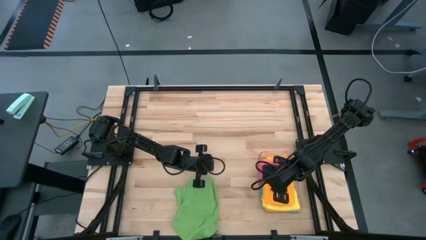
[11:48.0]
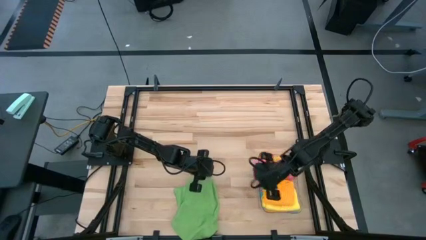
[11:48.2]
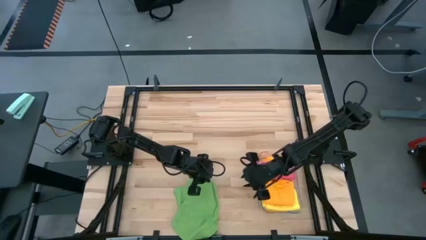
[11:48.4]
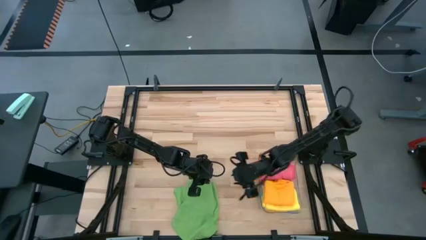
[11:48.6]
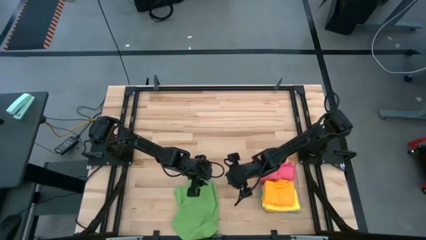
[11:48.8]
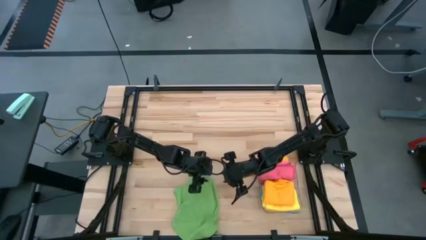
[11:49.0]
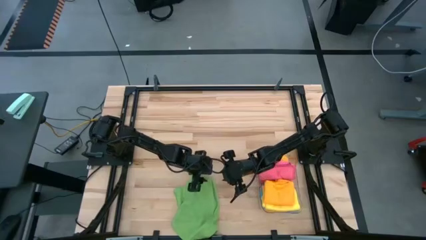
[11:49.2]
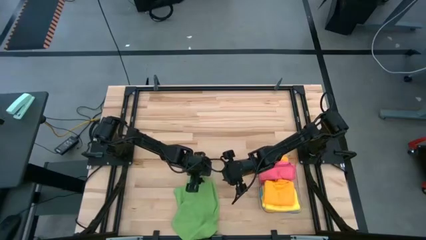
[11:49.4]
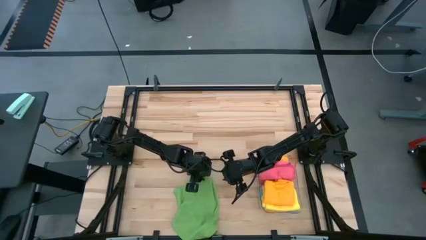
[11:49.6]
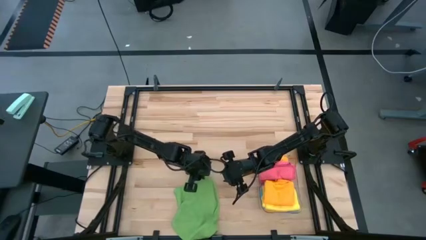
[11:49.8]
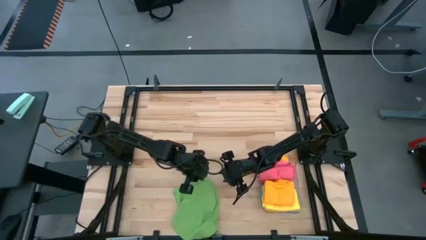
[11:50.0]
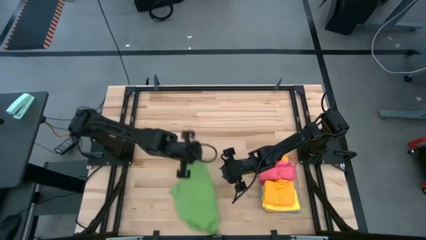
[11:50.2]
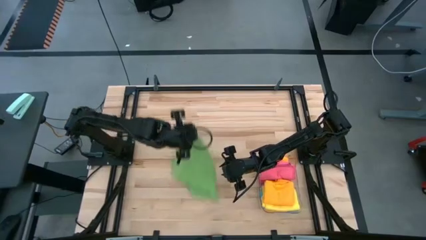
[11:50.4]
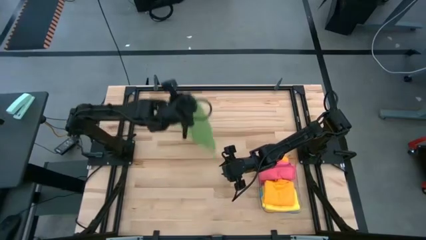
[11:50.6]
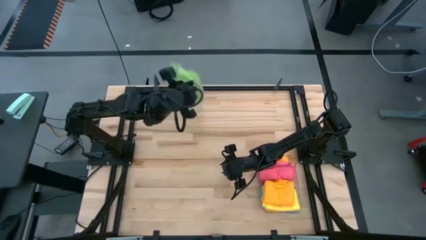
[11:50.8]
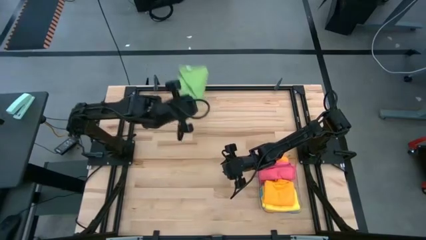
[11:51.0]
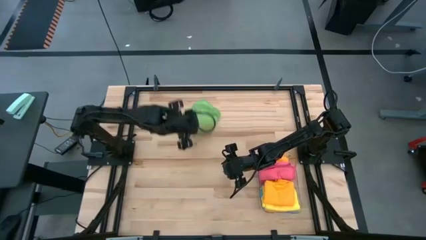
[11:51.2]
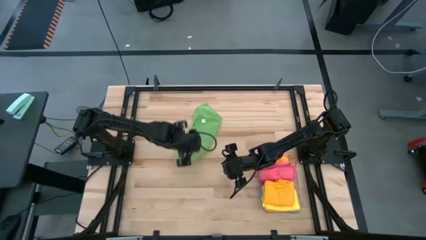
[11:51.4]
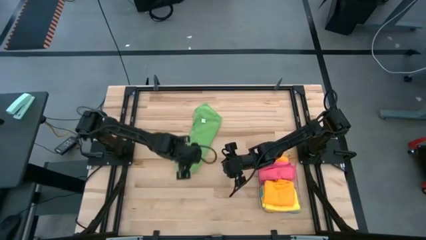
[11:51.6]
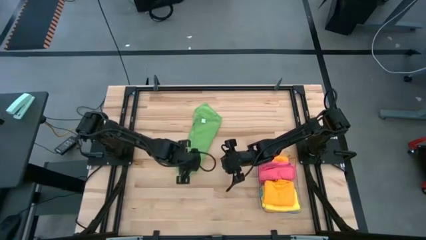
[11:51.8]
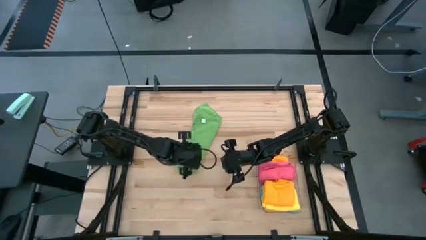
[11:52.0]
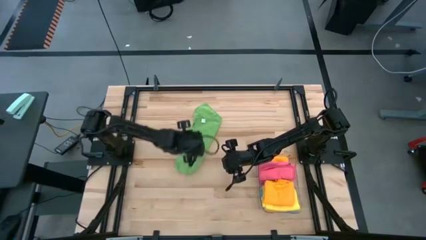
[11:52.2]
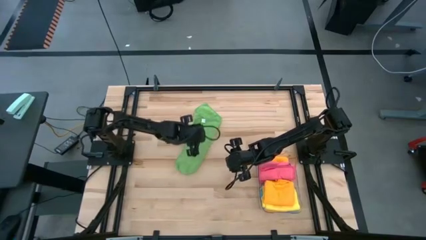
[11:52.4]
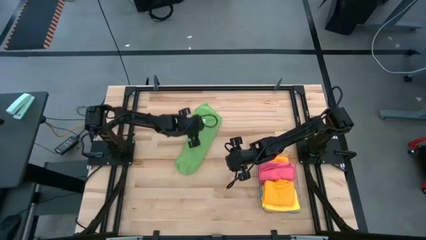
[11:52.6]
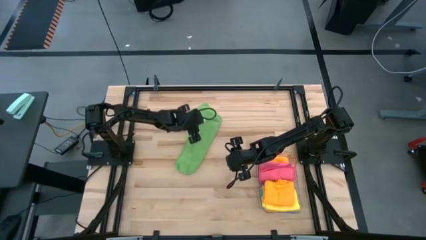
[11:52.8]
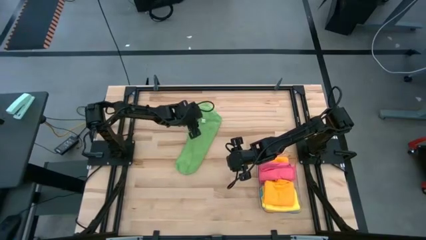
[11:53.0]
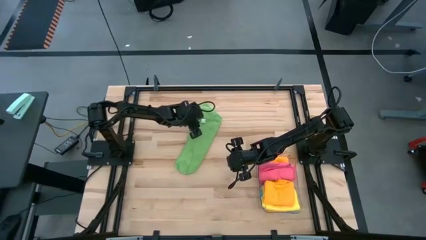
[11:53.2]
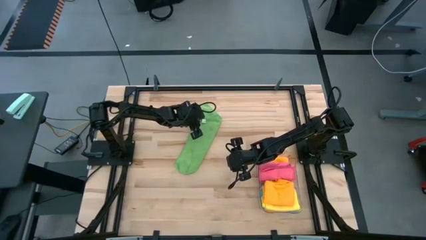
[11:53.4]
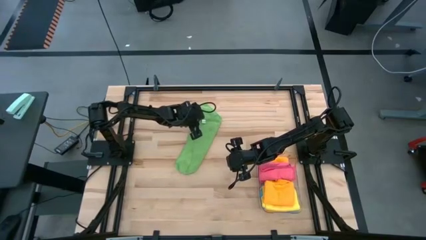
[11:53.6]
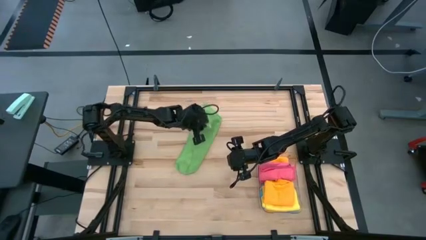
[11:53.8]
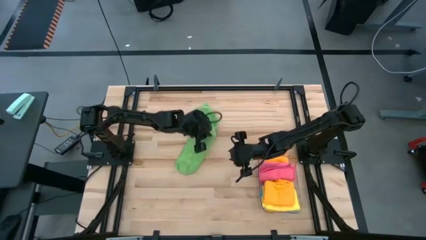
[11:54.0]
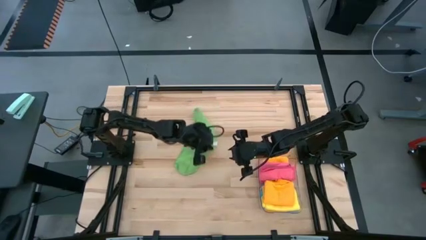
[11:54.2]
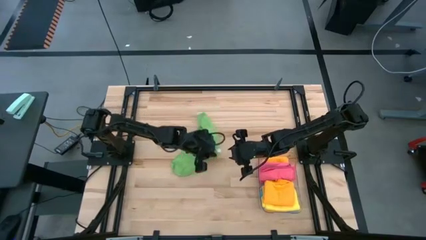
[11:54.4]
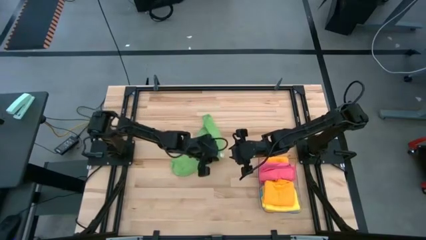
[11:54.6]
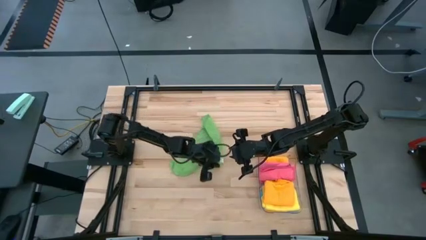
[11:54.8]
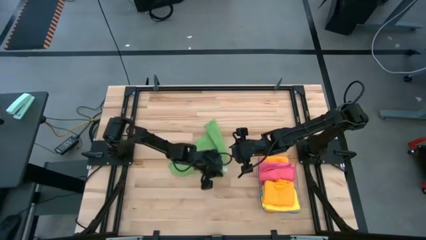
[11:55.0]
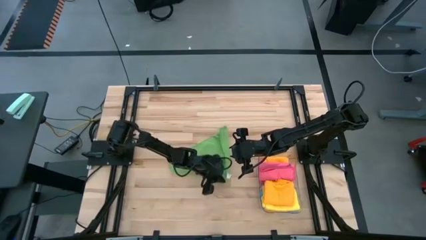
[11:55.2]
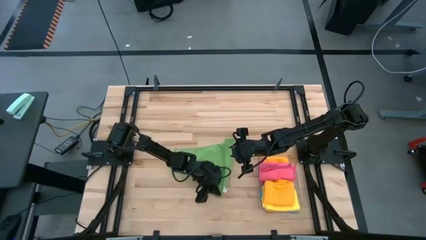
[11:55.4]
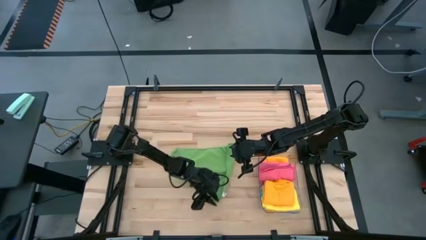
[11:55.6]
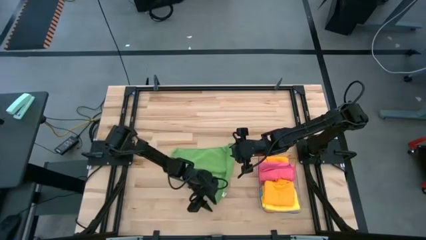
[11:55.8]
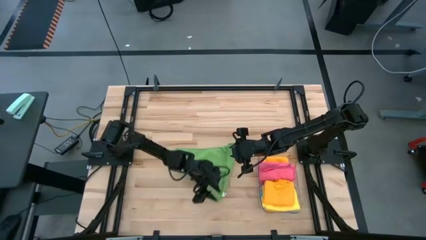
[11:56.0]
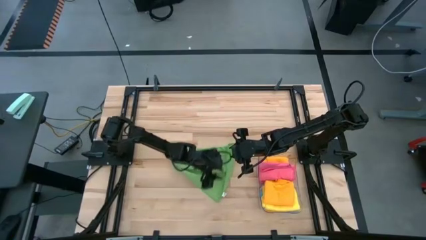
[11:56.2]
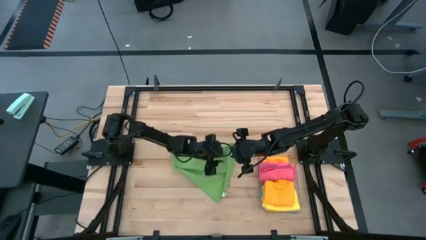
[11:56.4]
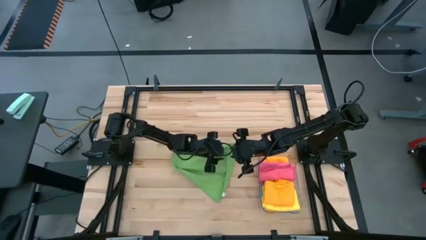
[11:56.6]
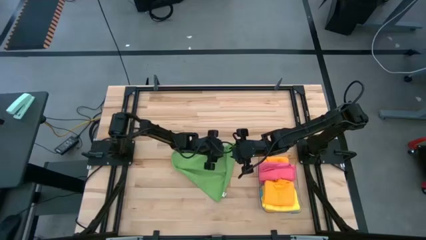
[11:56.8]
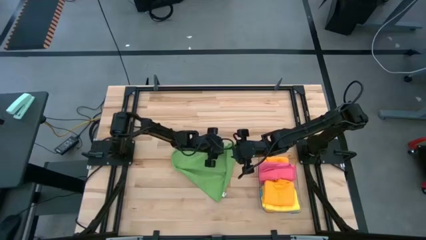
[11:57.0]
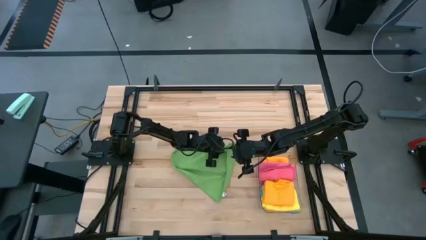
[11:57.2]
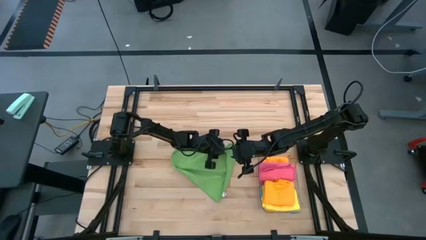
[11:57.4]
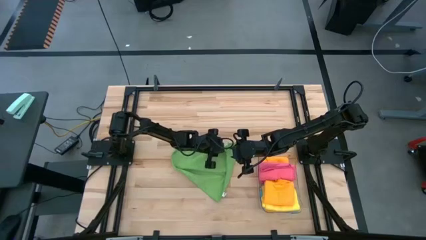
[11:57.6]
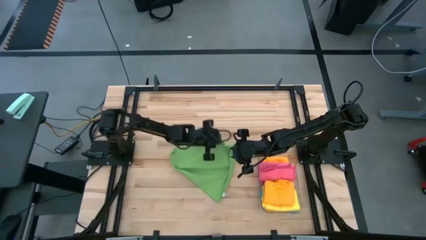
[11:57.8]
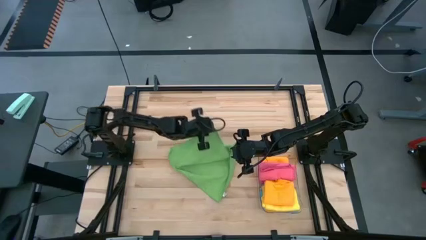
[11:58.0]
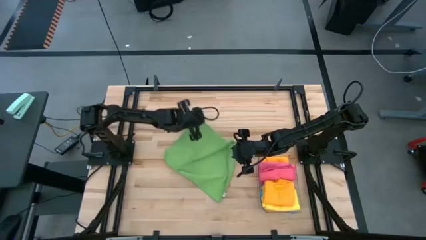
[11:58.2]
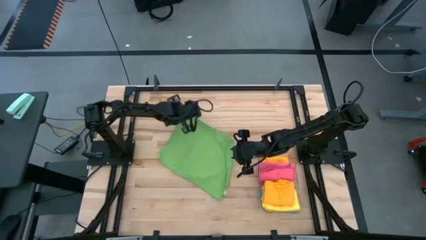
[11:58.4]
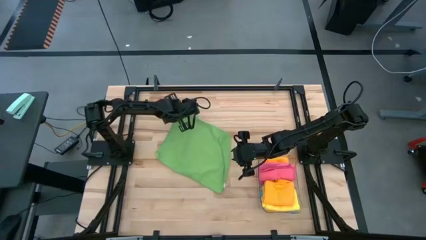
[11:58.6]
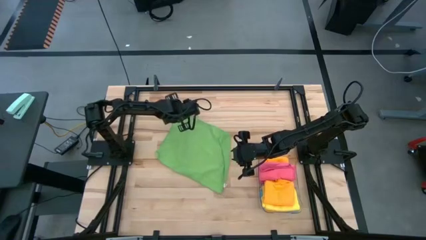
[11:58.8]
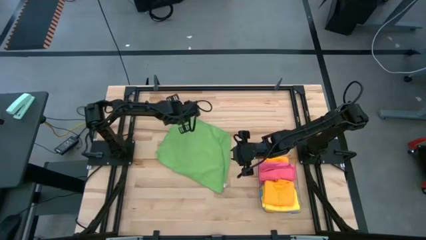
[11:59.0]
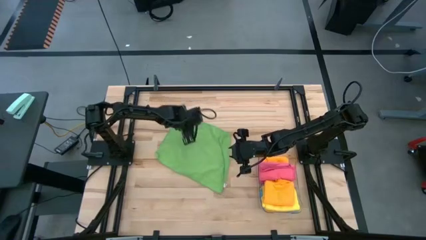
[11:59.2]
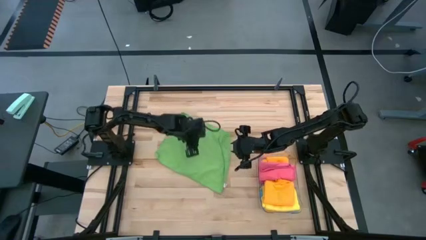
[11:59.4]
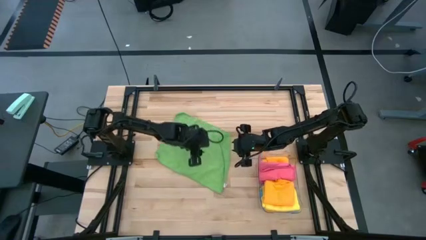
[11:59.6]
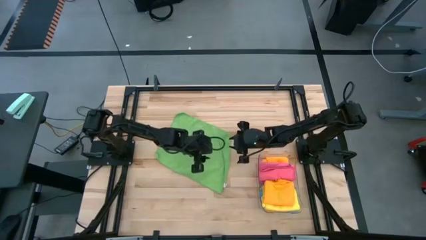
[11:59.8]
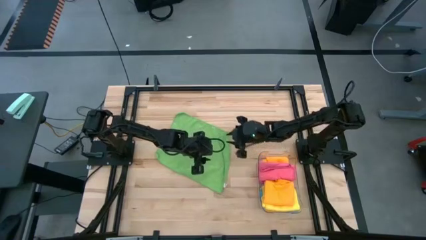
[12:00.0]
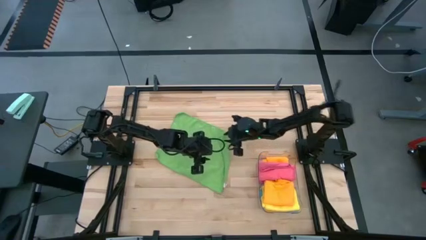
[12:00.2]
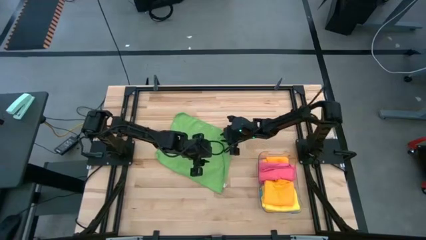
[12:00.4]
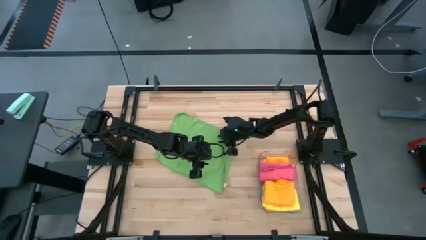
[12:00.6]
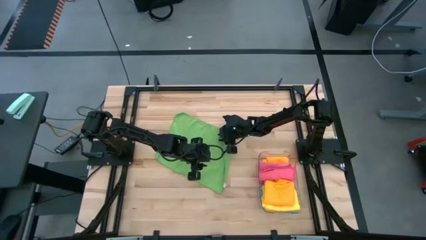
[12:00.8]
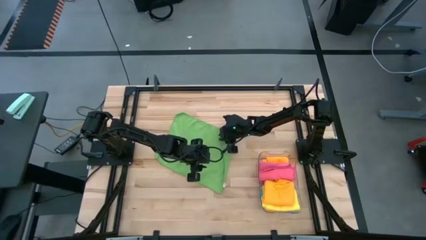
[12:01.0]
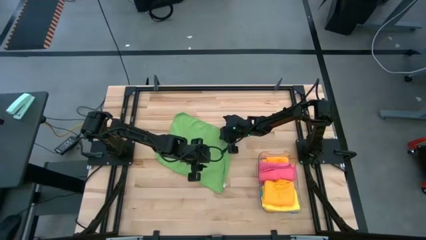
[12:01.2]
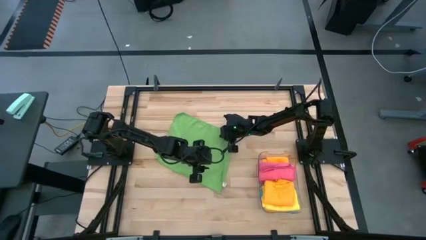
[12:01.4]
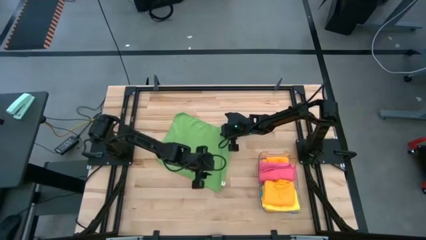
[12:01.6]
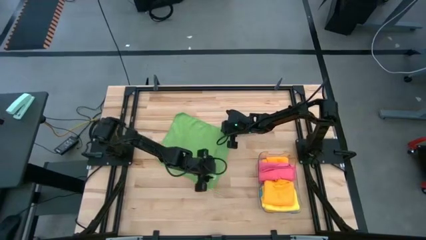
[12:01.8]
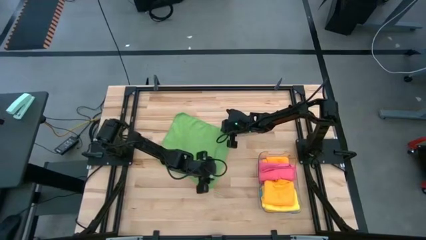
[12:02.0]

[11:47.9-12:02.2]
Task: Fold microfiber towels
Fold the green towel

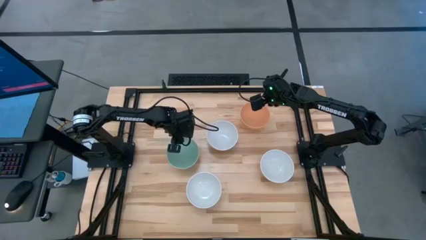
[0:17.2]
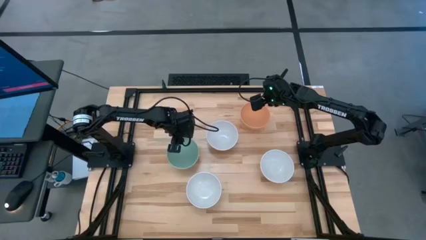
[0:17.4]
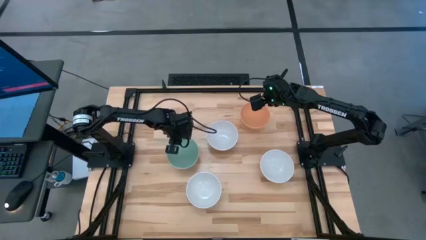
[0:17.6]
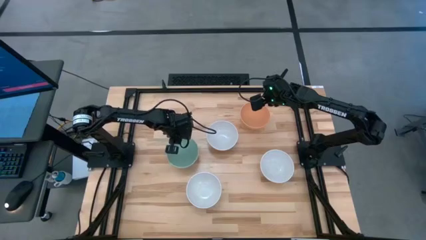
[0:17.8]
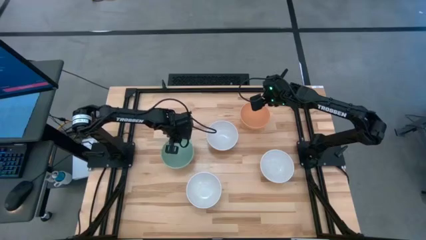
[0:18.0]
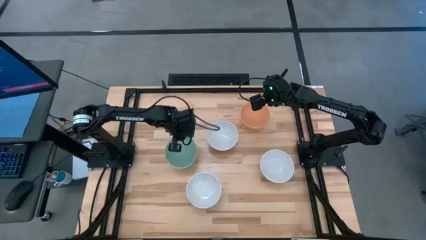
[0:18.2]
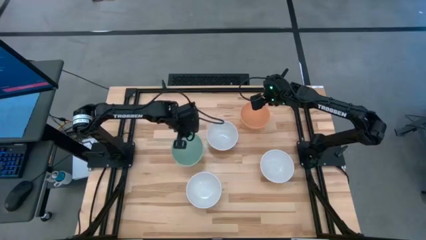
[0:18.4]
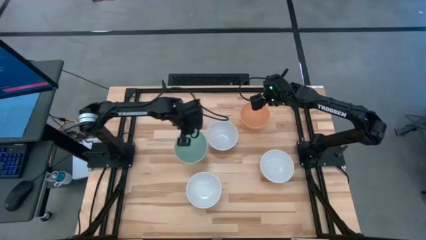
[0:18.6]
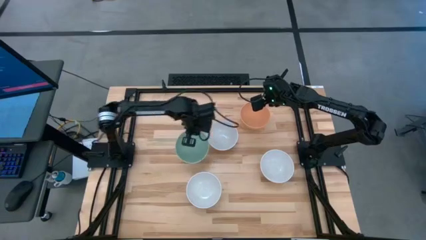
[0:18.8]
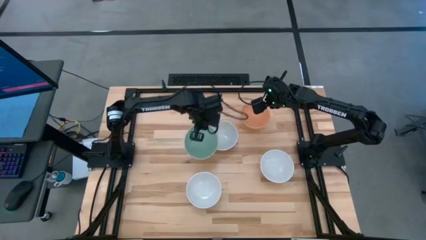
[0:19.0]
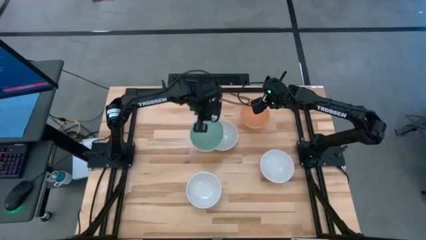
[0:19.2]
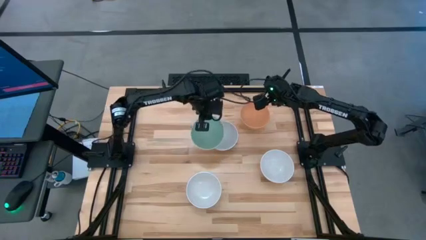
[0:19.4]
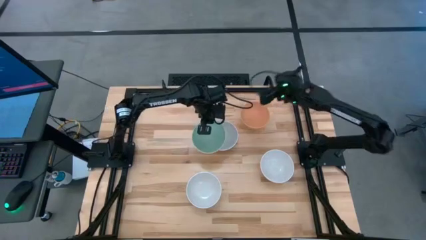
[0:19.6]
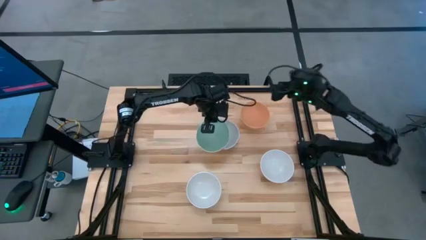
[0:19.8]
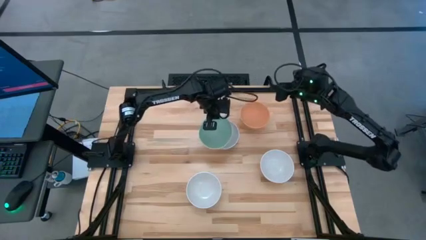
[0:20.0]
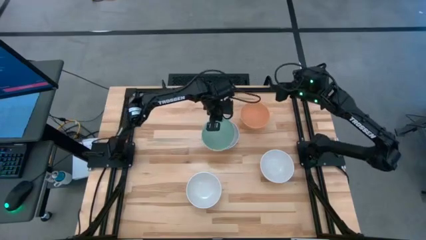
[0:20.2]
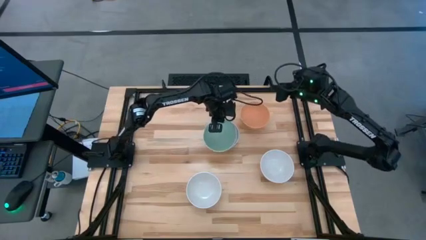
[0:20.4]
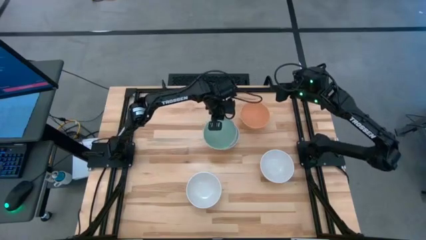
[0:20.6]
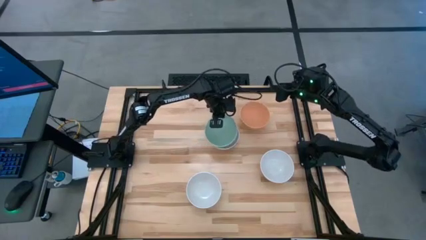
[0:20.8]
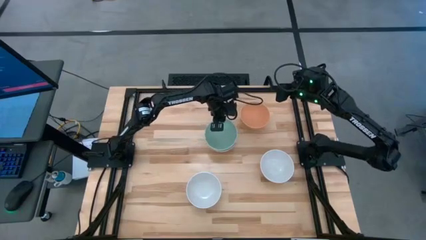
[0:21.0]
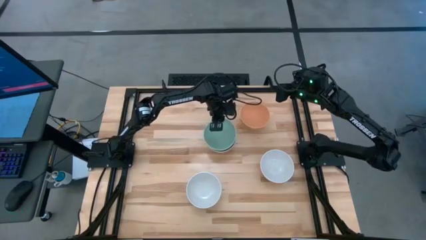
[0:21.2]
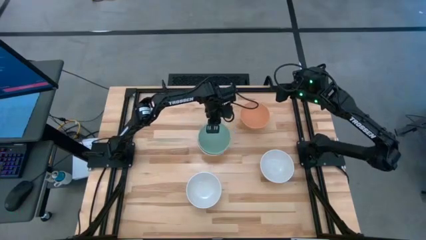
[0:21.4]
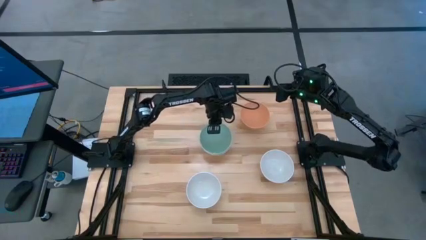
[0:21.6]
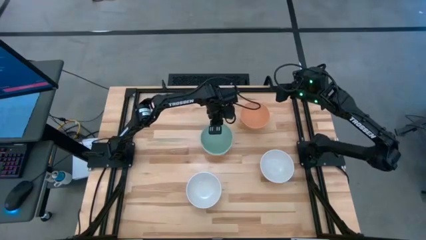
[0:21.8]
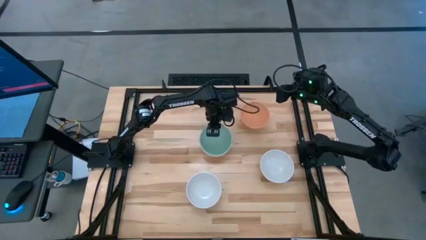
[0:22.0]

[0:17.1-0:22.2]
Task: Nest bowls inside each other
Stack the green bowl on top of the middle white bowl
